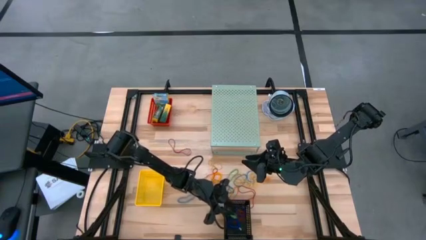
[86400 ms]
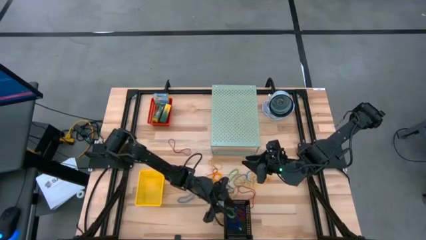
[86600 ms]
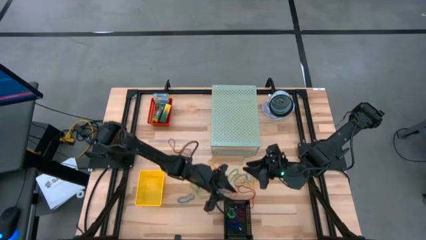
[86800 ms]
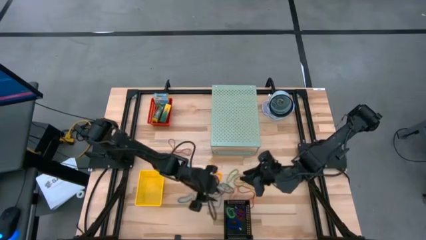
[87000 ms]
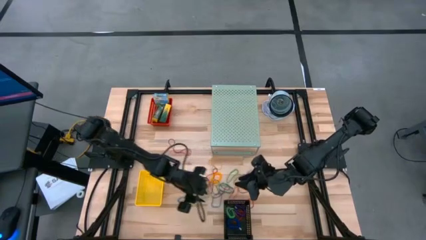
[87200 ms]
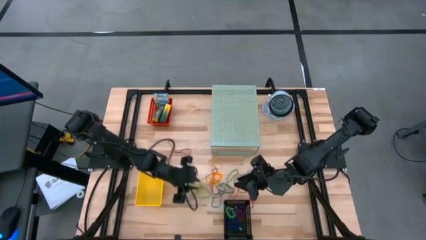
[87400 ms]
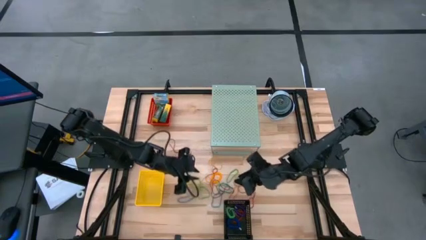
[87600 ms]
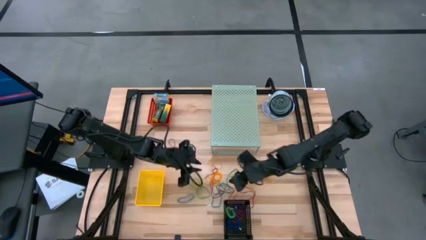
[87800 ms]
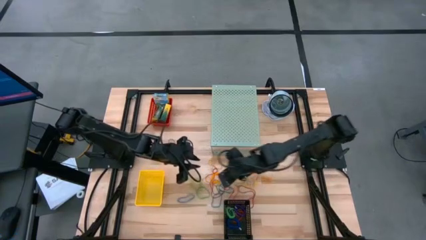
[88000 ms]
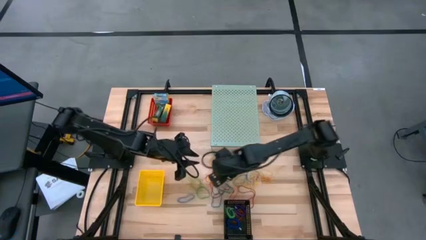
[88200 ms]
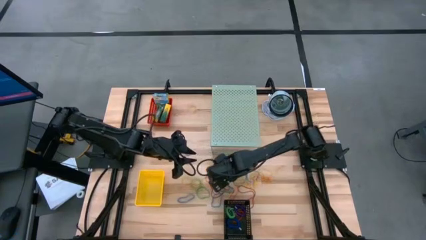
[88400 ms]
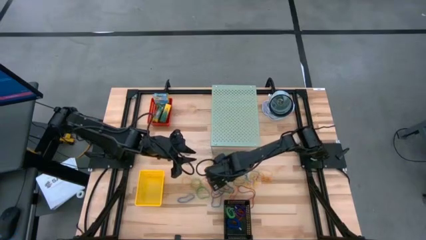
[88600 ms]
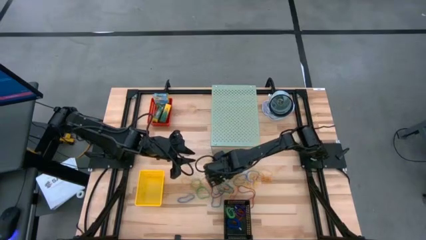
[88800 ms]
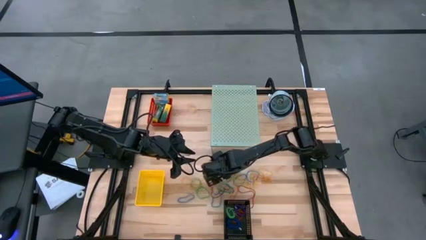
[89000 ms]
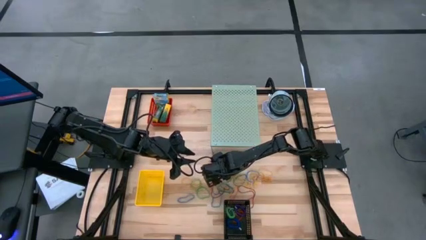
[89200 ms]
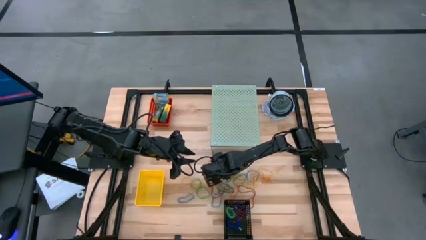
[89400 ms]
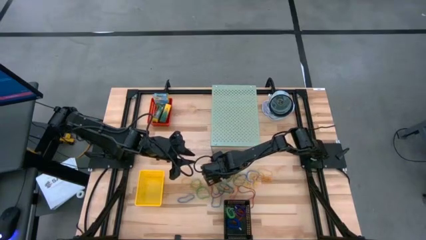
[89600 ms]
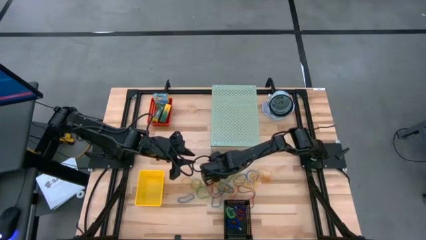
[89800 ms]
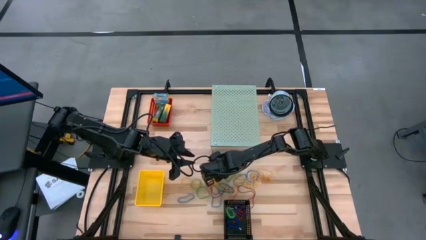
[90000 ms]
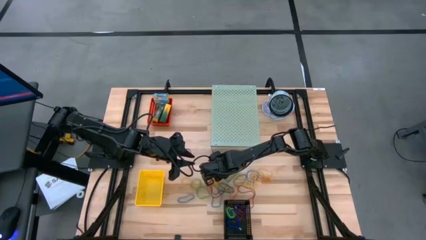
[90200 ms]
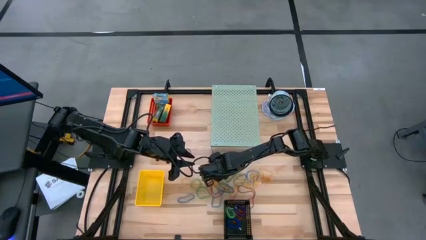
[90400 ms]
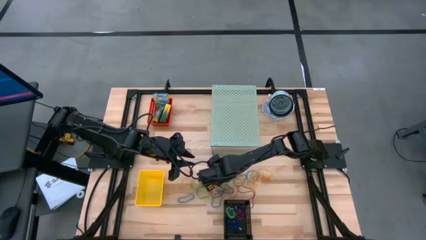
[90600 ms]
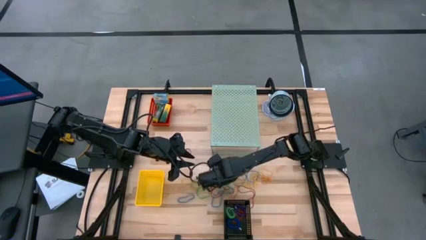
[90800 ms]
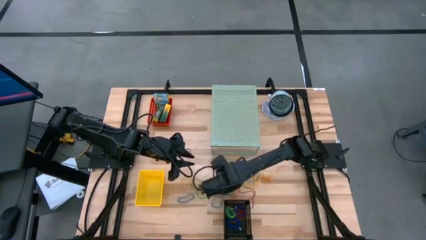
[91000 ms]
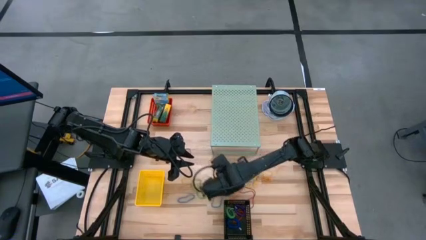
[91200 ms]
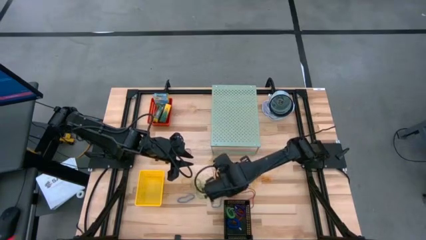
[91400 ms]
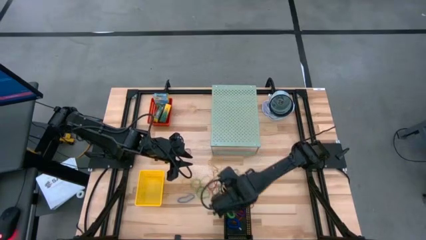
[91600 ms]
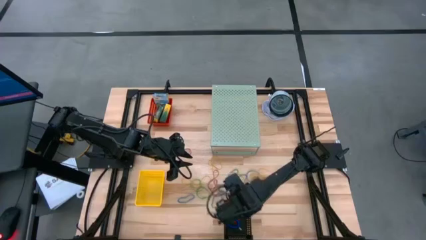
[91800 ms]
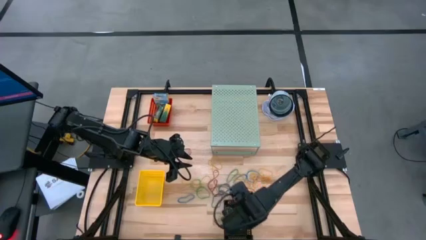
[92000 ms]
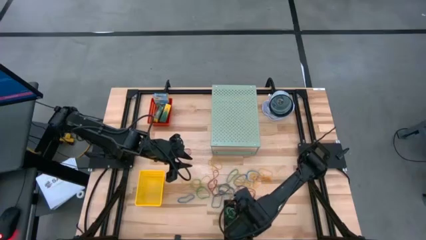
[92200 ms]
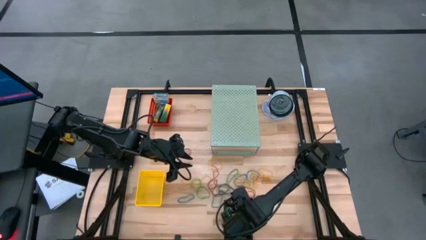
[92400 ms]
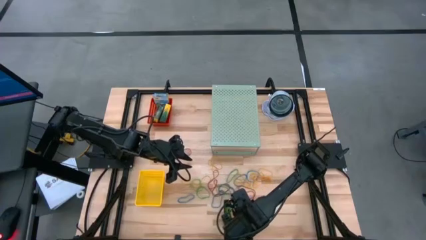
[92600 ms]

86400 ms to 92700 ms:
Task: Pick & Place Office Desk Supplies
Put the yellow spring keychain into the black bin

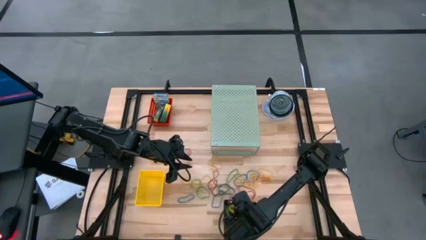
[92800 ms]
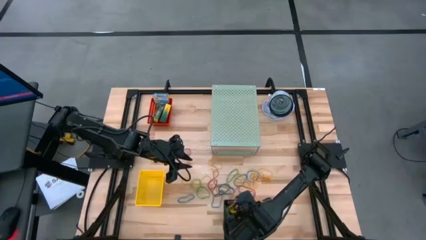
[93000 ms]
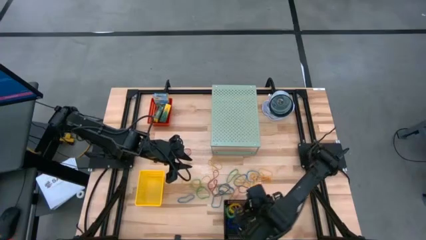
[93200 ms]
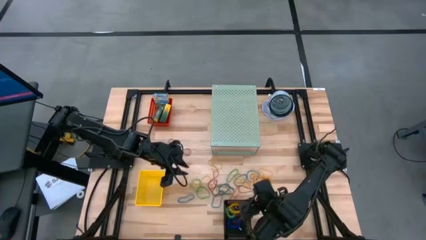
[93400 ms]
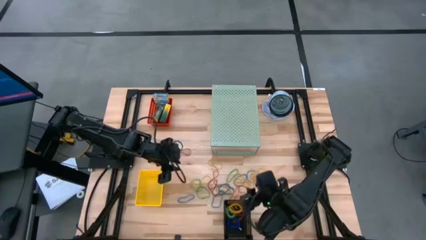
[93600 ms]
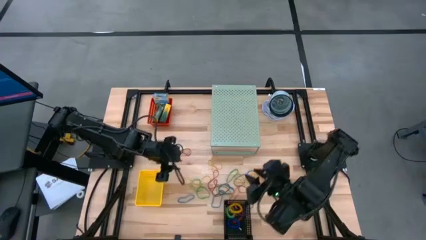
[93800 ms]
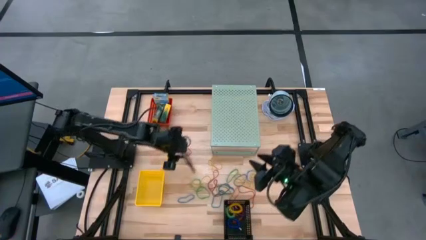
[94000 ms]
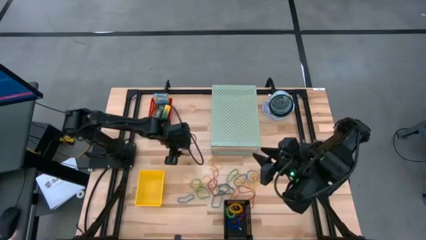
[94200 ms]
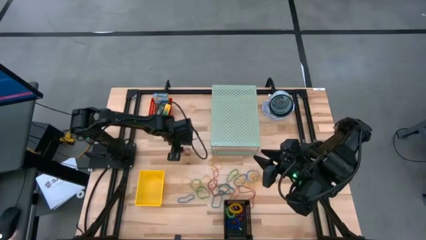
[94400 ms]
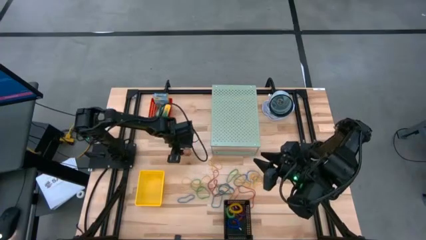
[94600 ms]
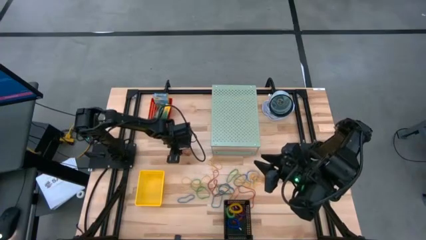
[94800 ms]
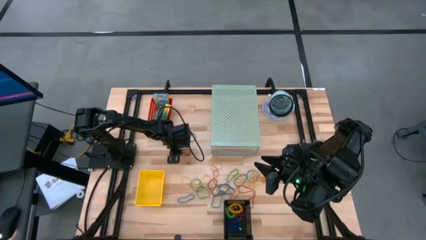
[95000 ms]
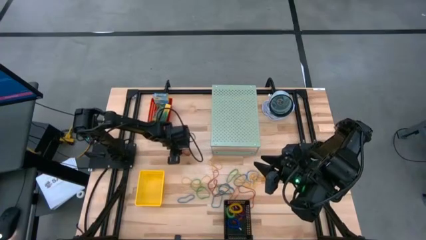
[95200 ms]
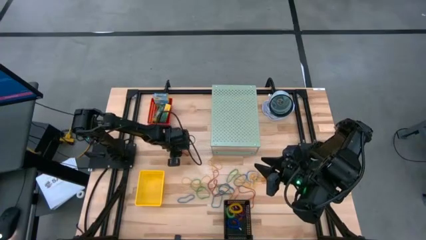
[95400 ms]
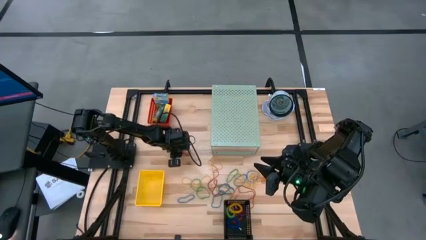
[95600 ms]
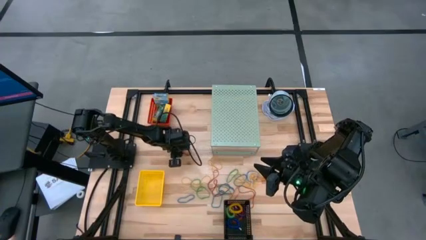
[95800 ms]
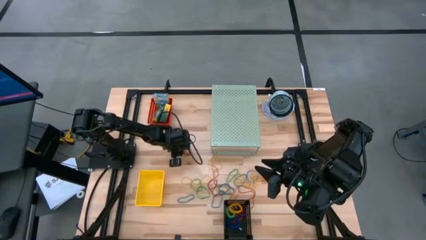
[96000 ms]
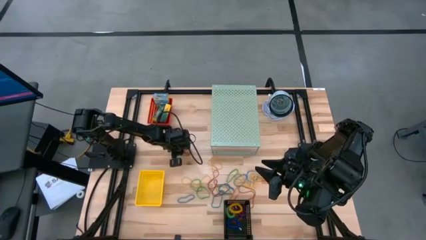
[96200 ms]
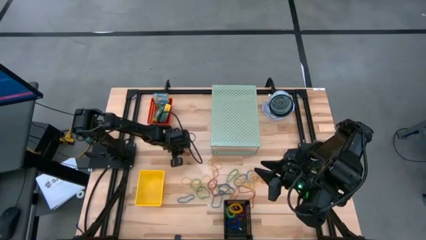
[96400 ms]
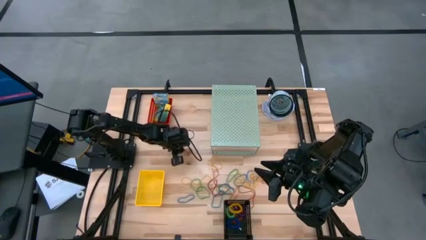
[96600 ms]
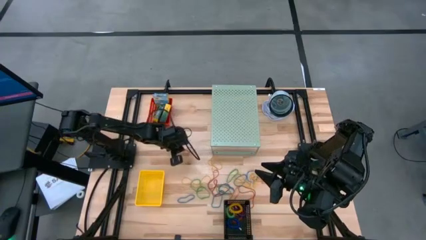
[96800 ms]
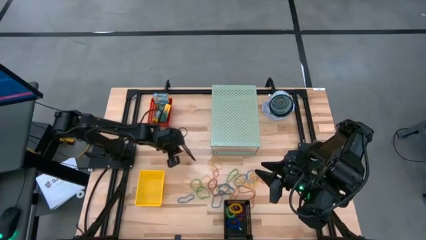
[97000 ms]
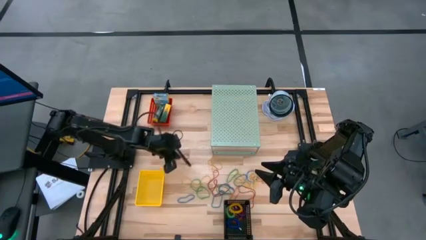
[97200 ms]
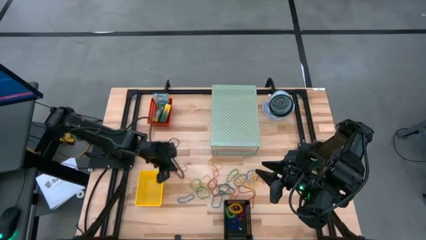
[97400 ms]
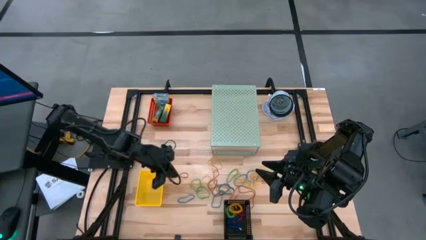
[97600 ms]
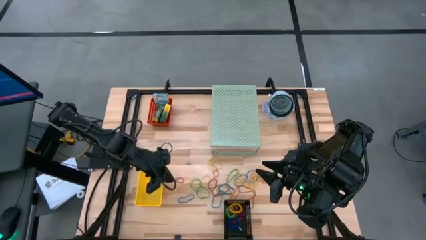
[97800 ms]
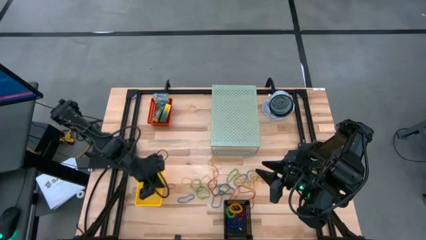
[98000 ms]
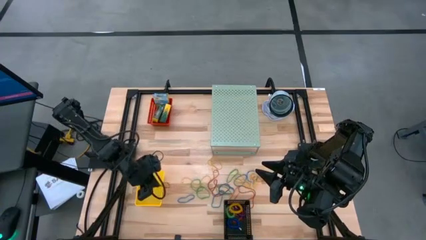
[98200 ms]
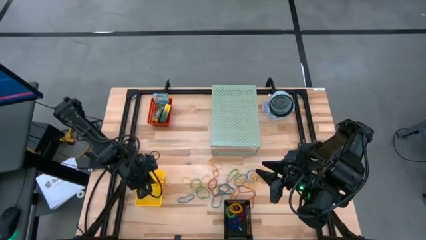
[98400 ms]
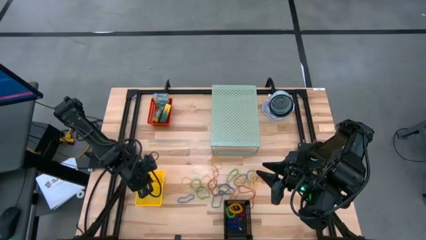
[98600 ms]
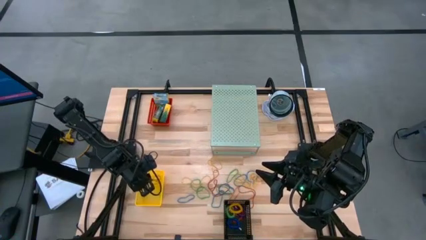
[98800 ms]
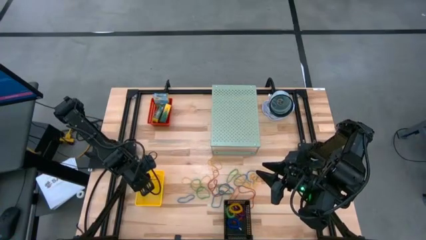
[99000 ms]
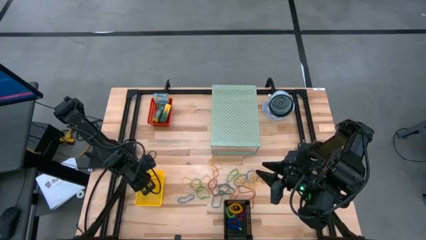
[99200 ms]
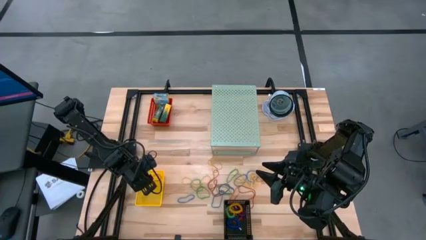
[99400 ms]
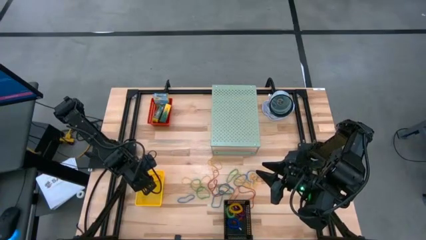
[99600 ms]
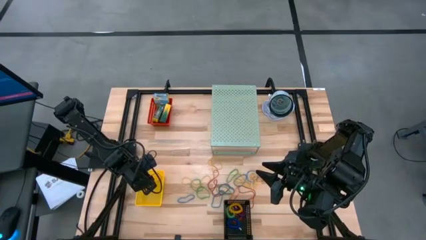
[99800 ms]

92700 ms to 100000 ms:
Put the red rubber band into the yellow bin

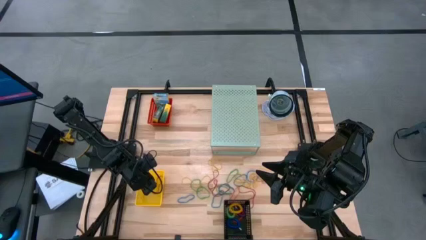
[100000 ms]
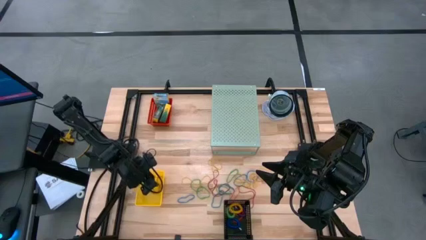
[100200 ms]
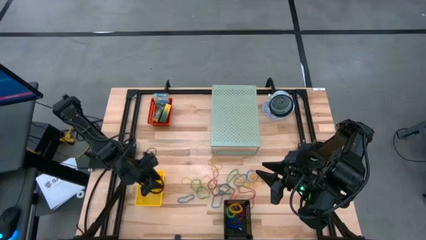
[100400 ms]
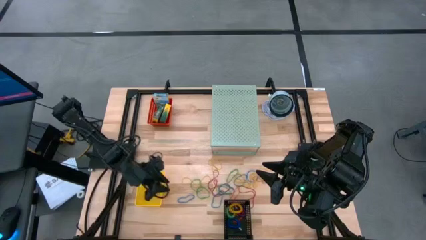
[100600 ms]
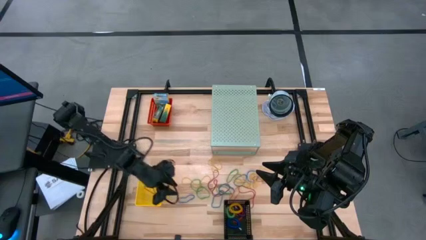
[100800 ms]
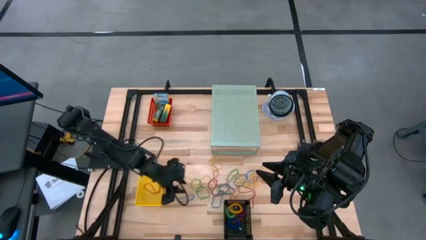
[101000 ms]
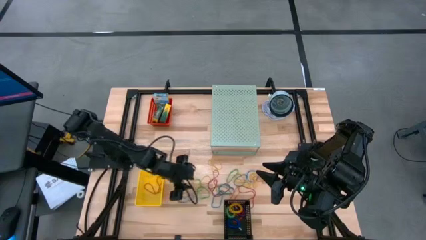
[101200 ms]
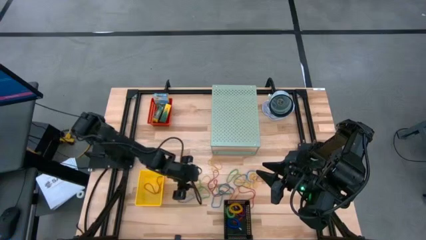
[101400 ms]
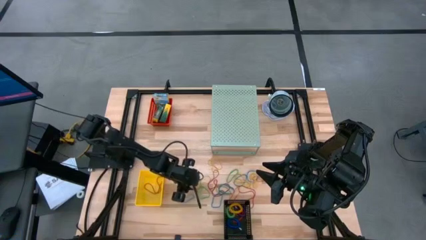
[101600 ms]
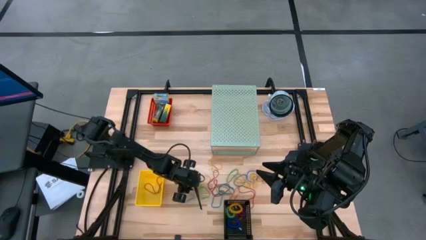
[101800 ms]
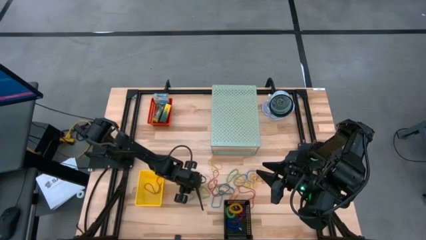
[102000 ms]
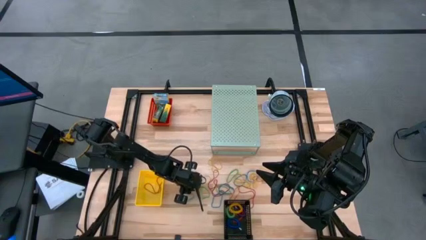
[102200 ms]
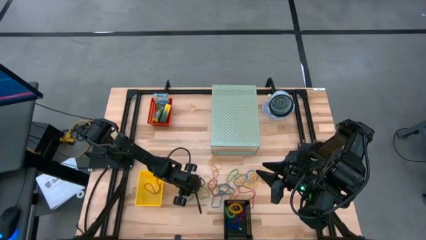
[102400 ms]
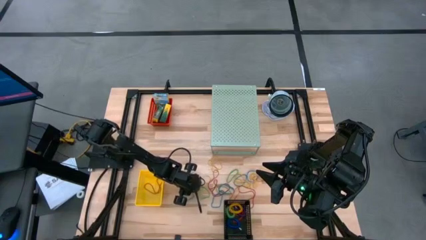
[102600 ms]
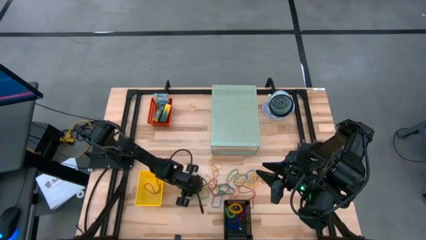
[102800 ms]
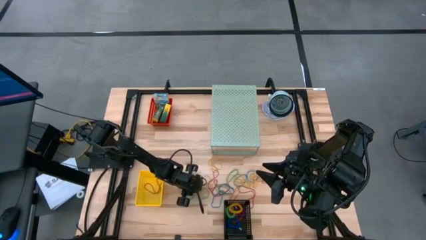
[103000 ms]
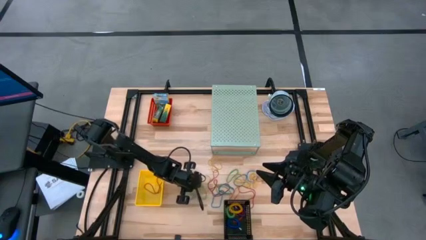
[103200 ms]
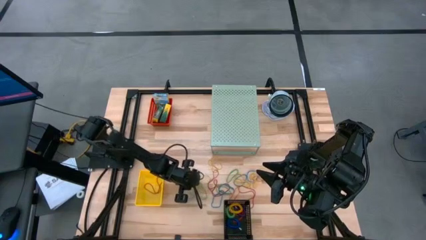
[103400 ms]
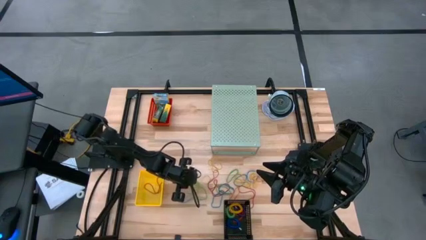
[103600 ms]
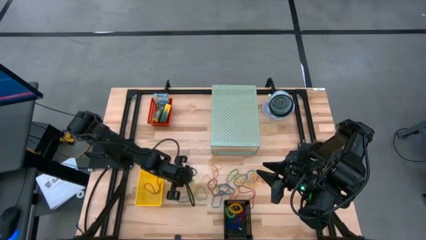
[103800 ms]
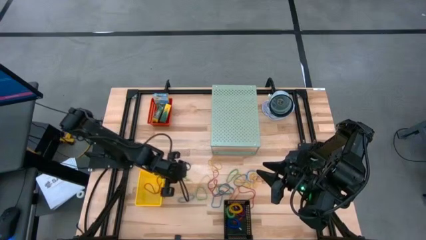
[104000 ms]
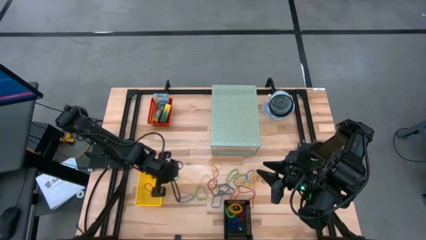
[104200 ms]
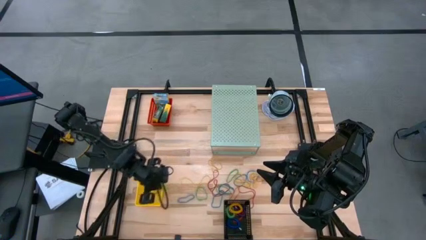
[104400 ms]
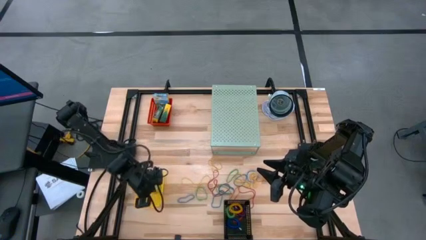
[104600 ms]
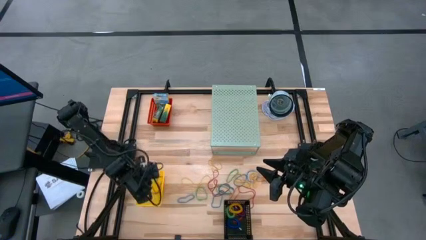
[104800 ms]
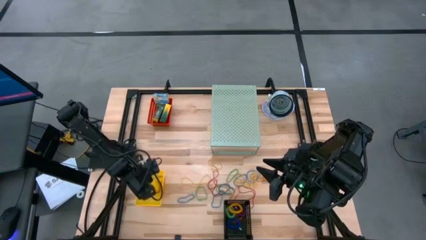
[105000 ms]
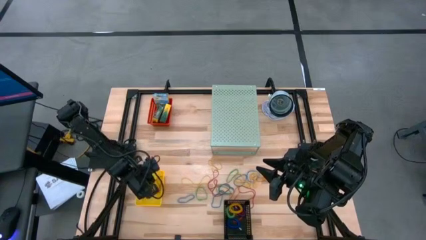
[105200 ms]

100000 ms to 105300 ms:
Put the green rubber band into the yellow bin
